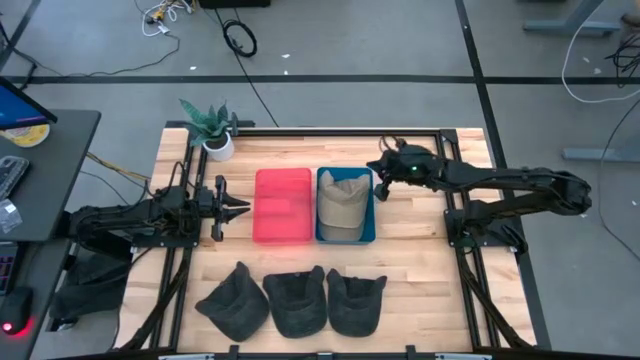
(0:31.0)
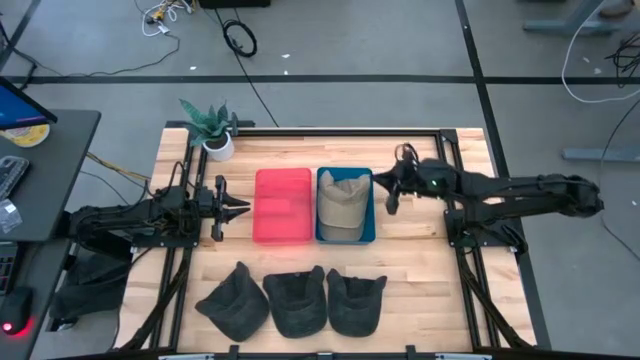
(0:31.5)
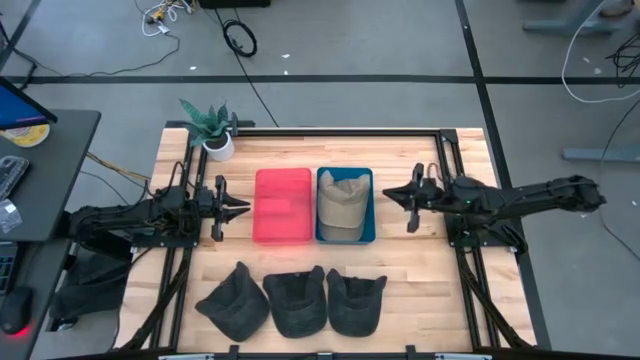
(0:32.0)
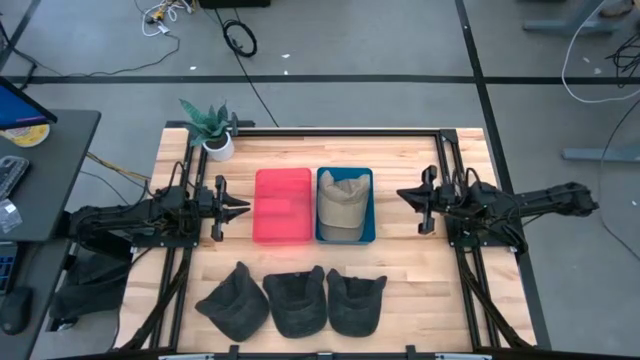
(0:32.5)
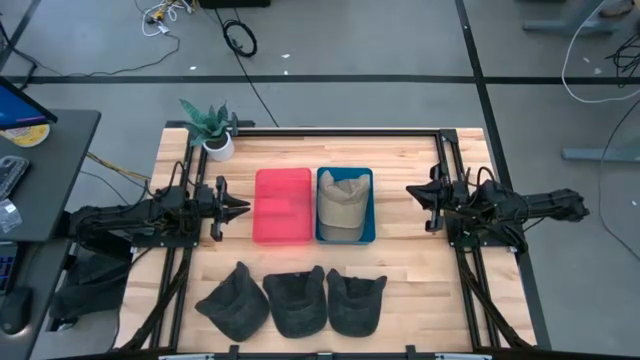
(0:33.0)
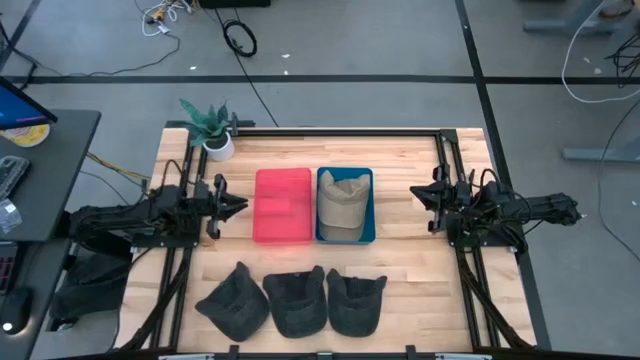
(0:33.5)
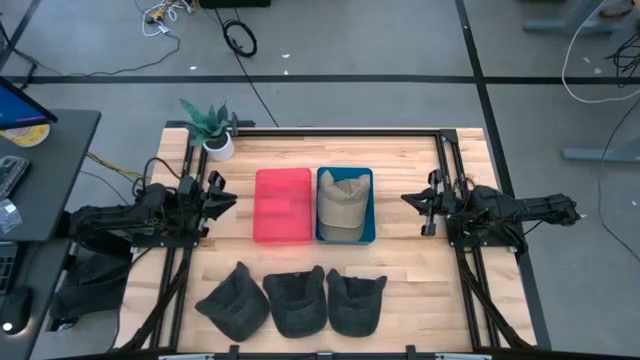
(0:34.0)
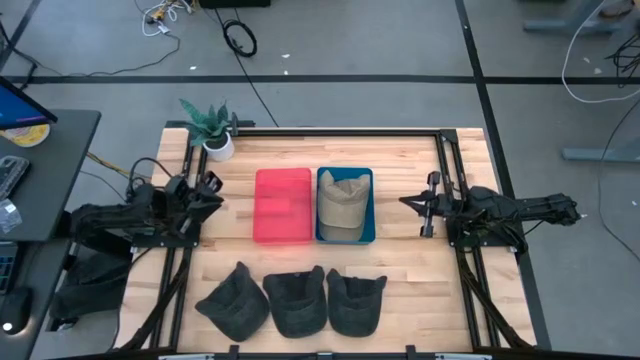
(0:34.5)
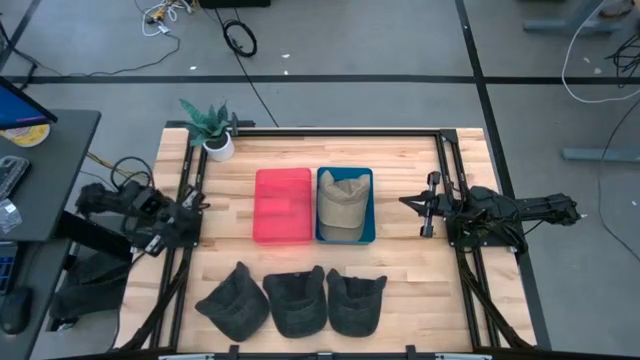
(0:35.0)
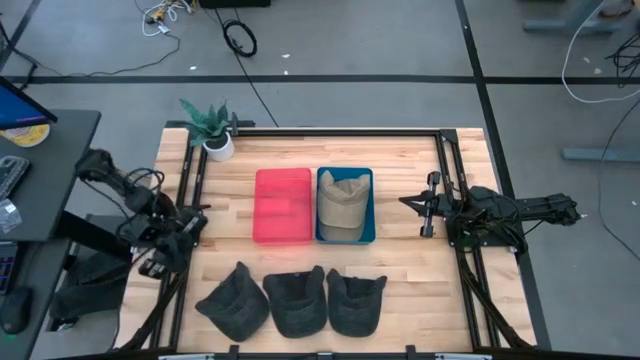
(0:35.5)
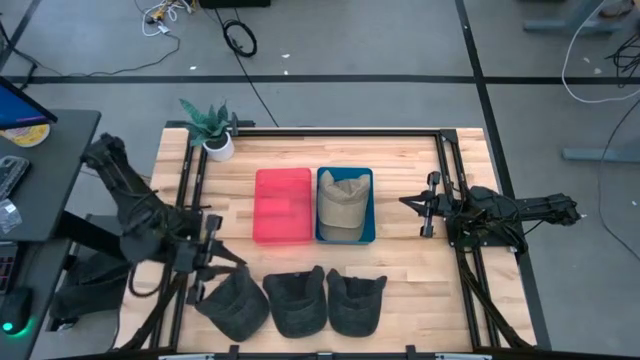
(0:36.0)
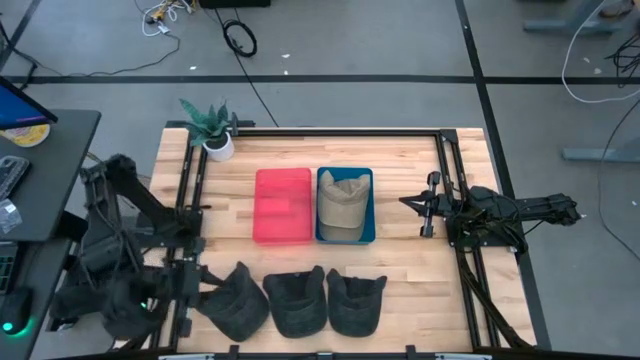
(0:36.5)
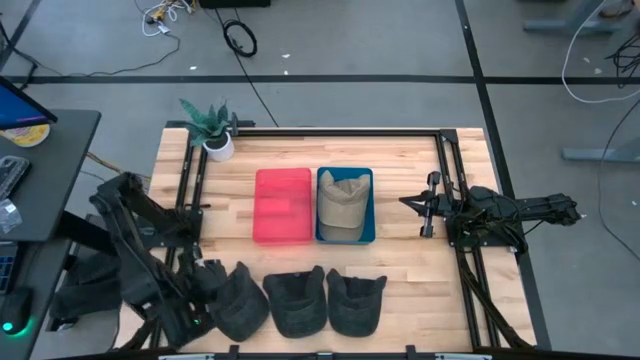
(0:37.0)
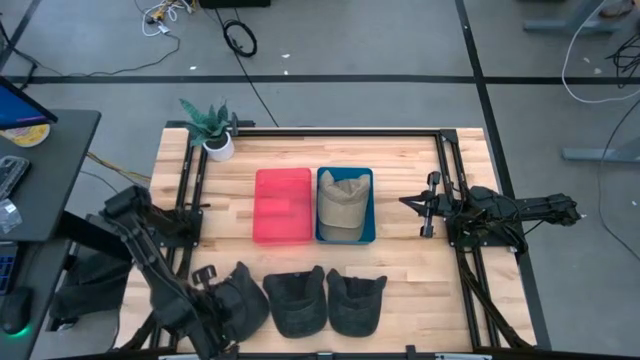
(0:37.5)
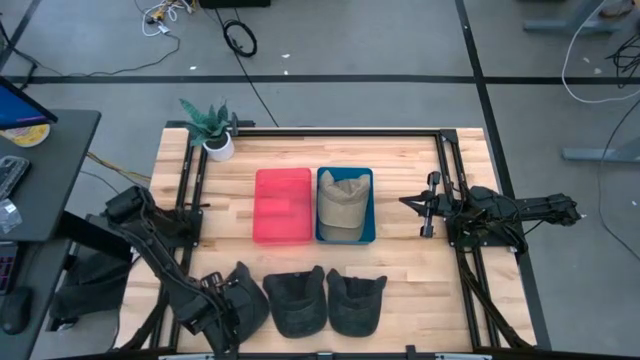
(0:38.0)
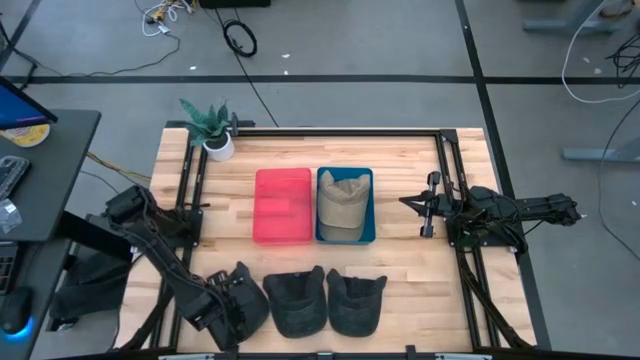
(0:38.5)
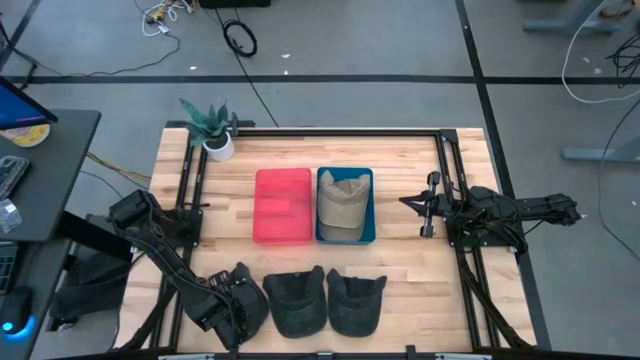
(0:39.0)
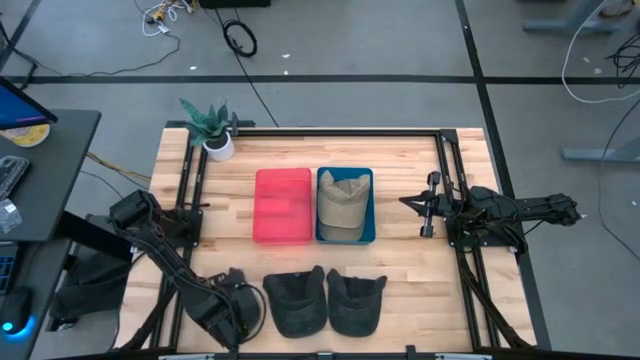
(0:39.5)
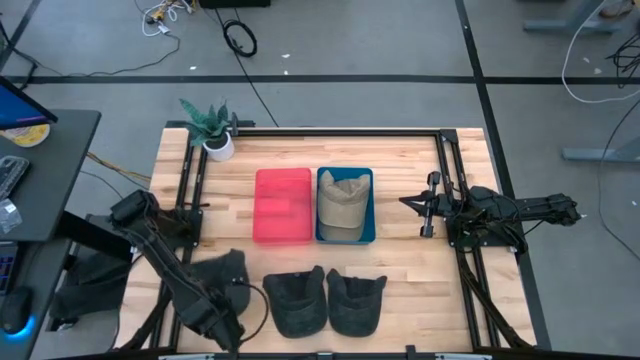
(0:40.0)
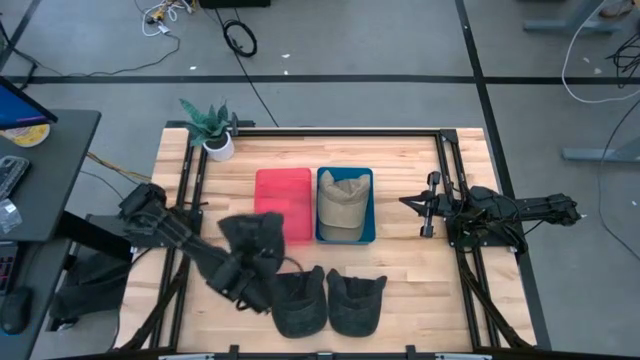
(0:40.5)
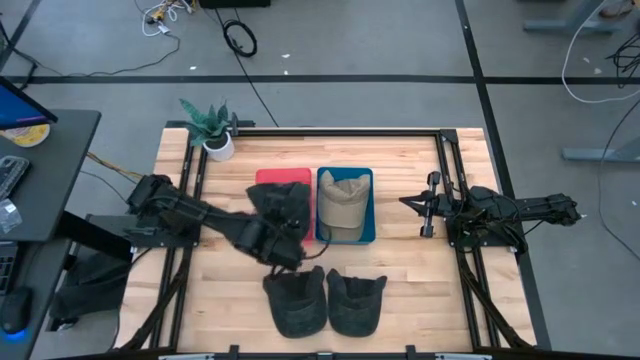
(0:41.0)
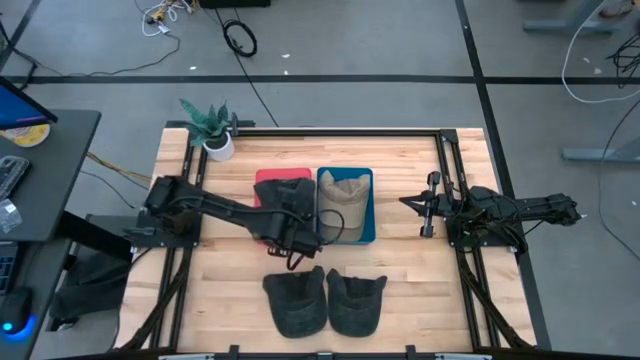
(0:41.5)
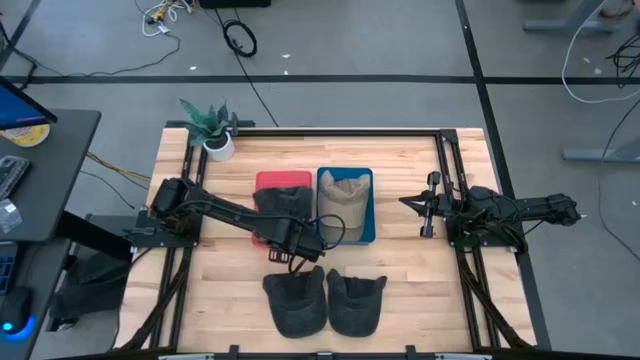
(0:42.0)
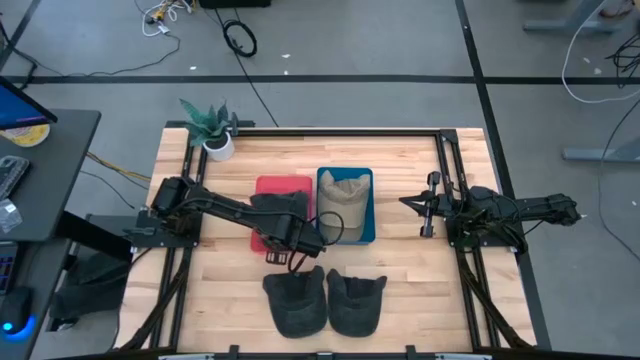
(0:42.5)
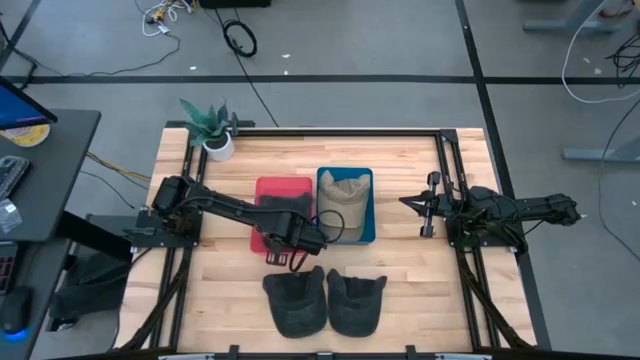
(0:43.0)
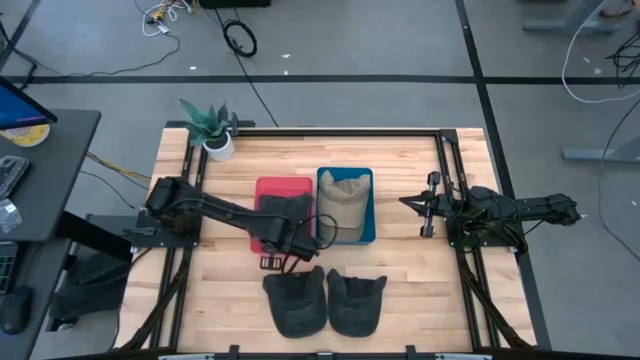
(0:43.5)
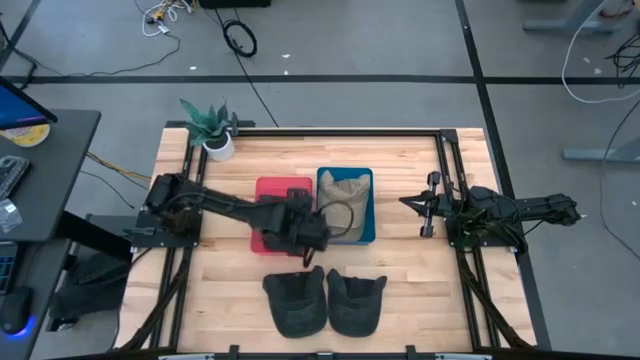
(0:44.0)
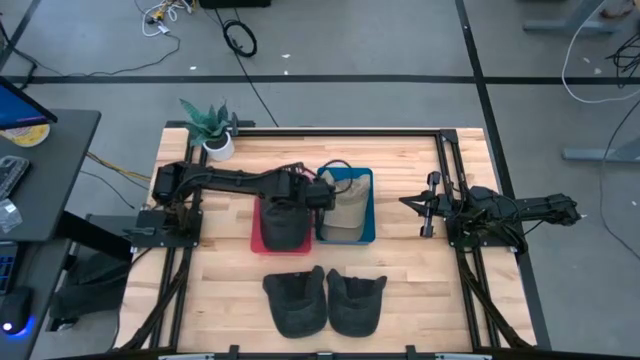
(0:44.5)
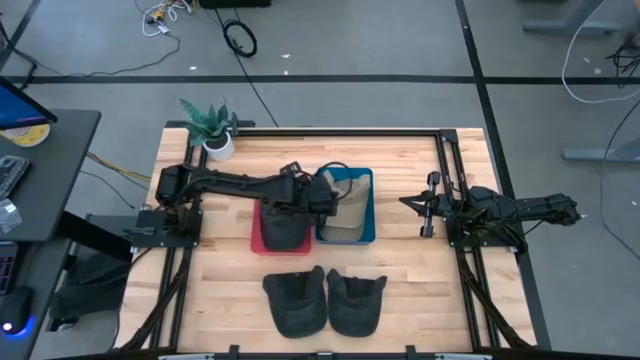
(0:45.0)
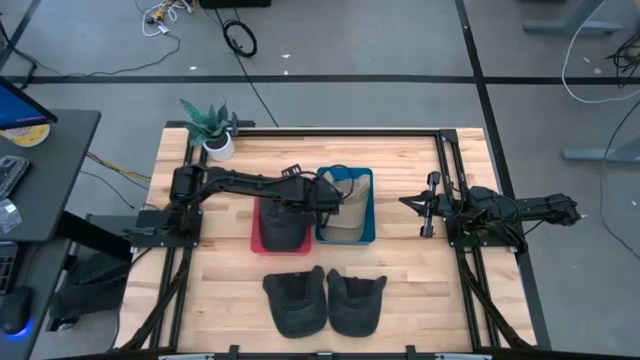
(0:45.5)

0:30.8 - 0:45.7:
Task: Pick & Place hat
Put the left black cap into the red bin

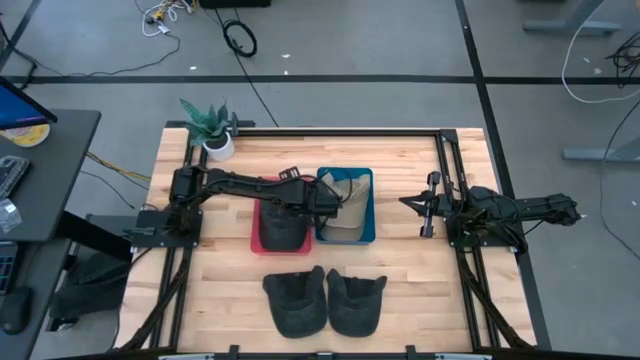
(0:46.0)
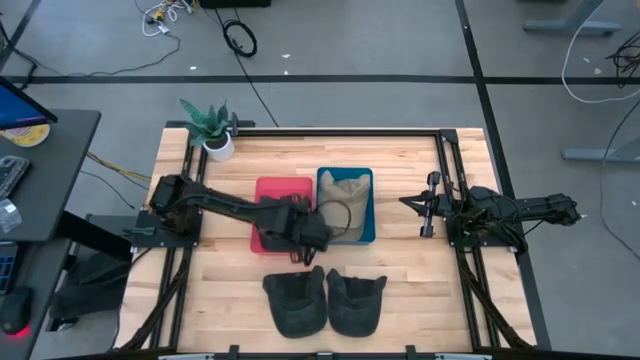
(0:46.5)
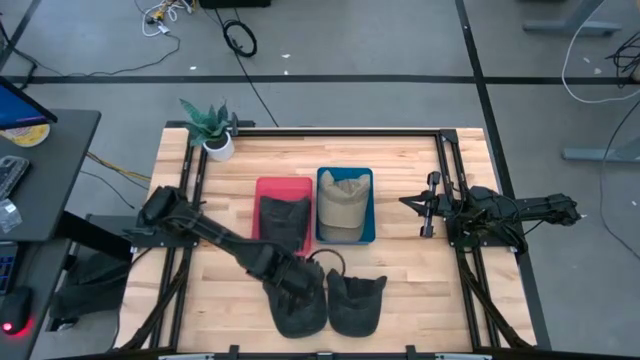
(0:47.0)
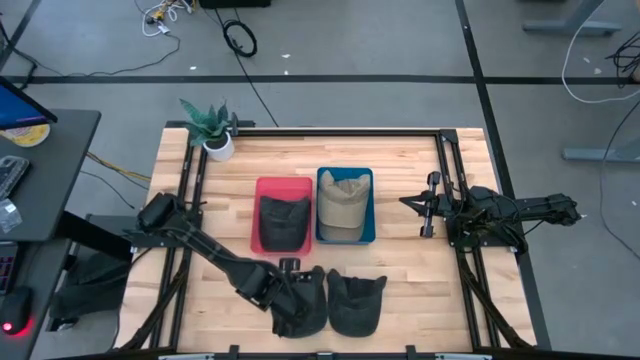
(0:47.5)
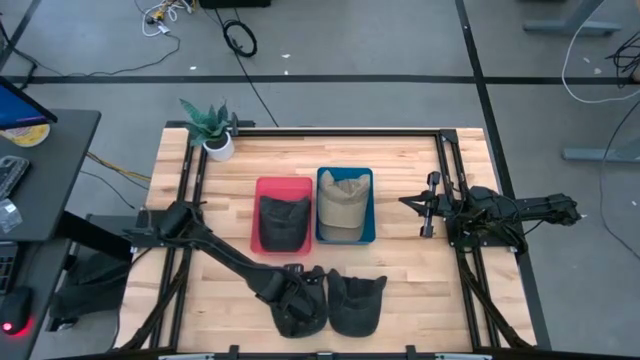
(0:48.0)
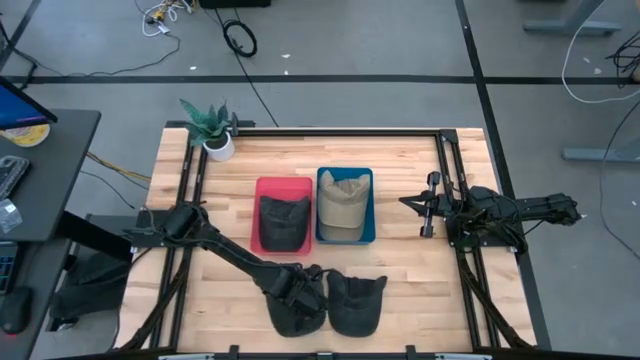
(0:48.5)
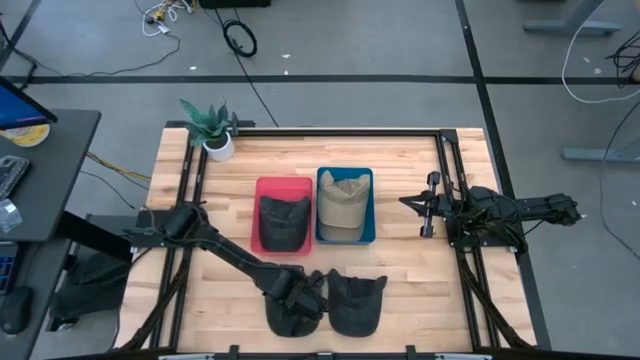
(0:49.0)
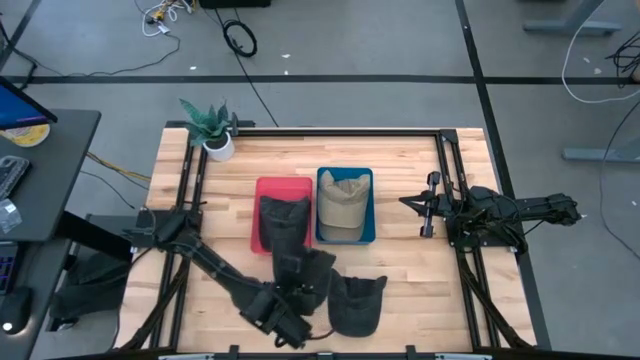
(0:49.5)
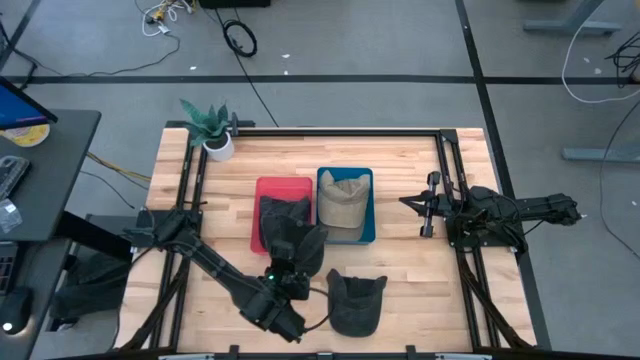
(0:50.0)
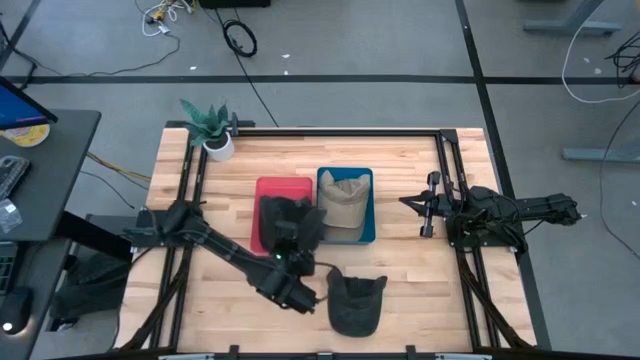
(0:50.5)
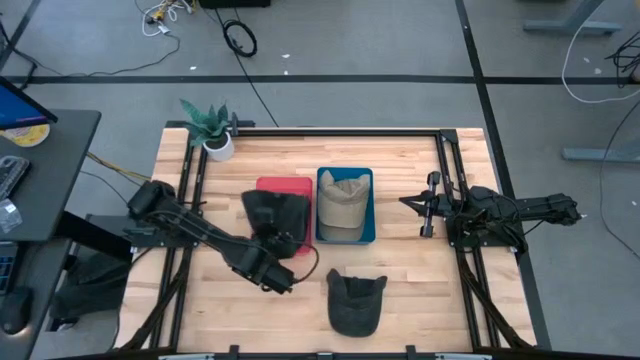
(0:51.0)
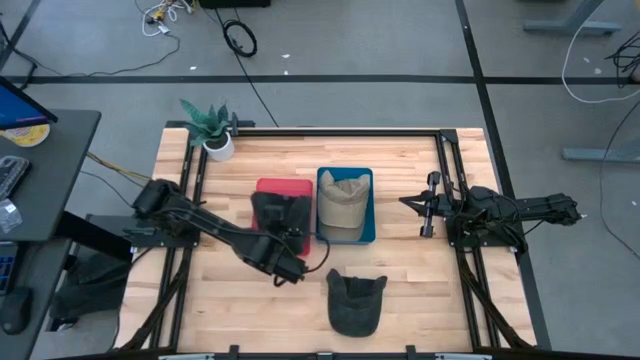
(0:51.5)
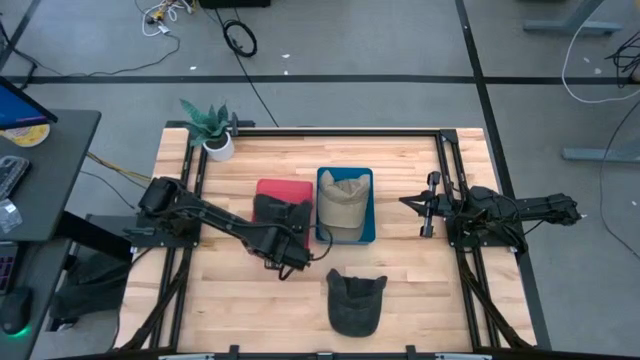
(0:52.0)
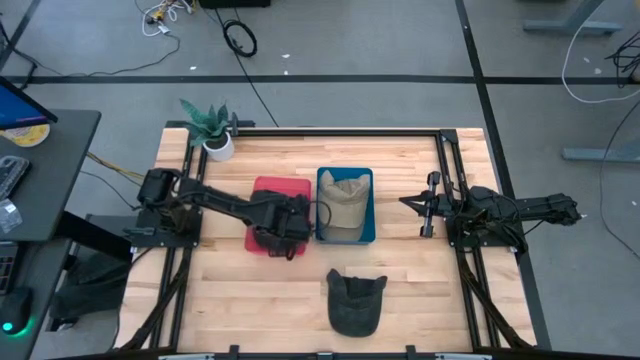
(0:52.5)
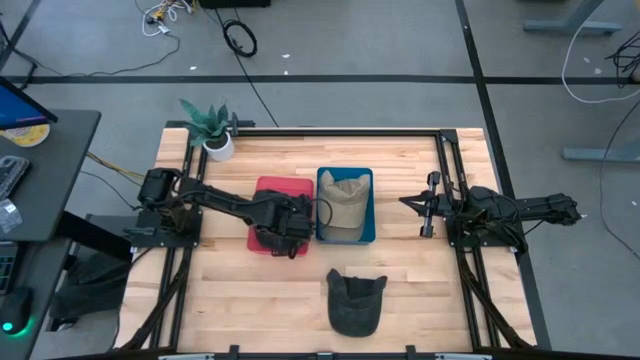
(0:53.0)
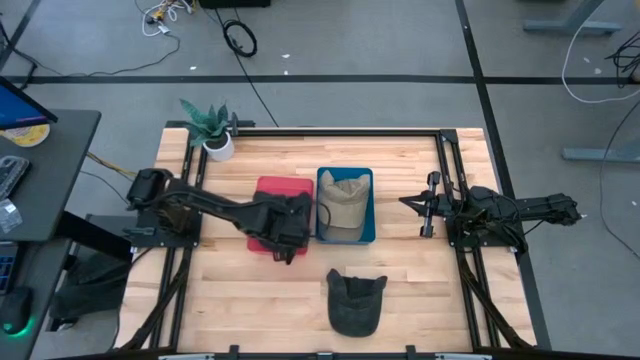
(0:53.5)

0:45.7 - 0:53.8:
Put the left black cap into the red bin
